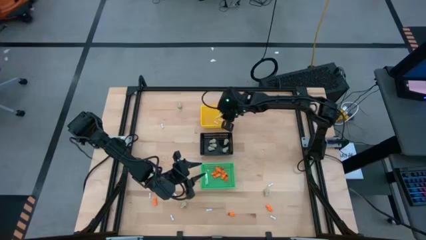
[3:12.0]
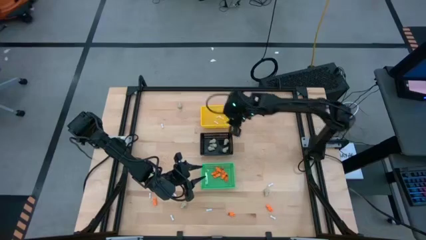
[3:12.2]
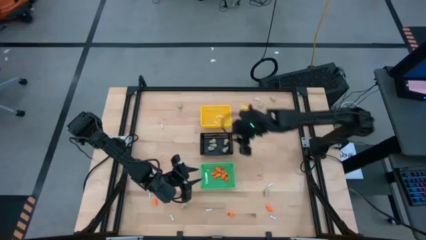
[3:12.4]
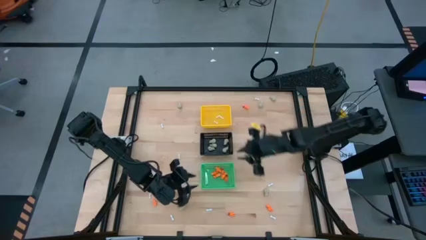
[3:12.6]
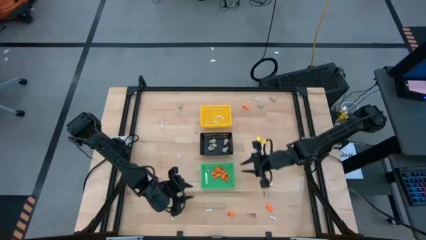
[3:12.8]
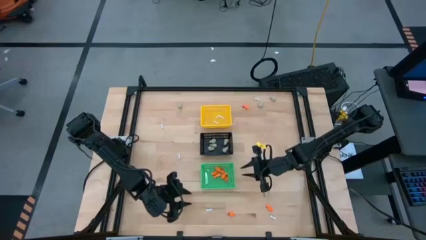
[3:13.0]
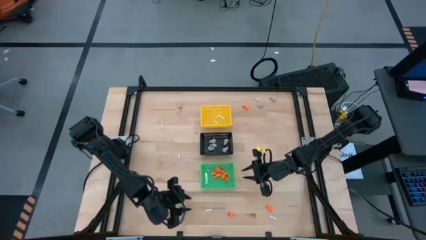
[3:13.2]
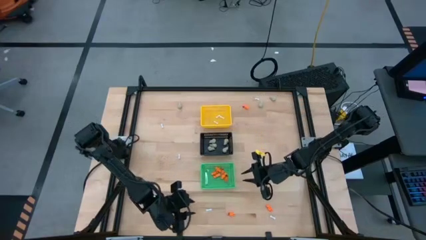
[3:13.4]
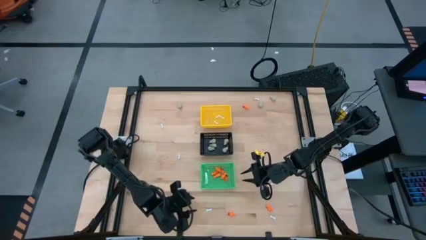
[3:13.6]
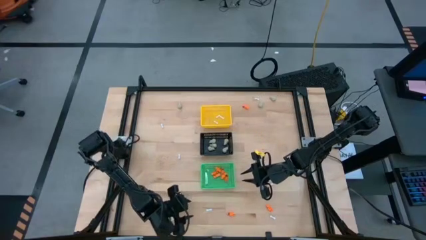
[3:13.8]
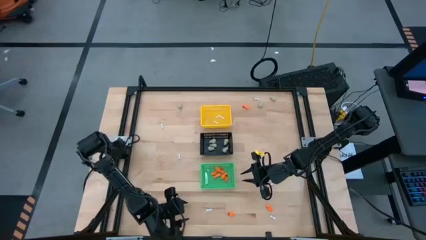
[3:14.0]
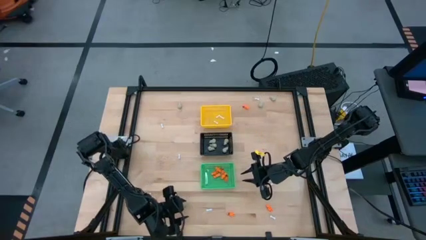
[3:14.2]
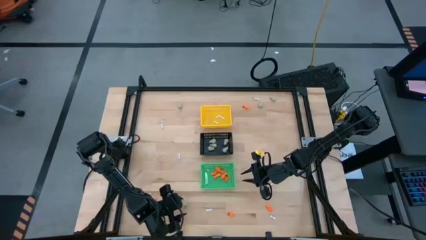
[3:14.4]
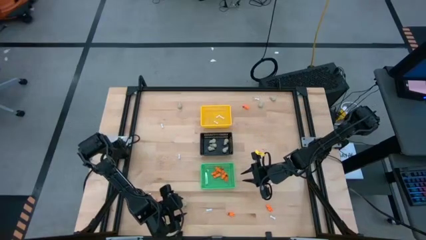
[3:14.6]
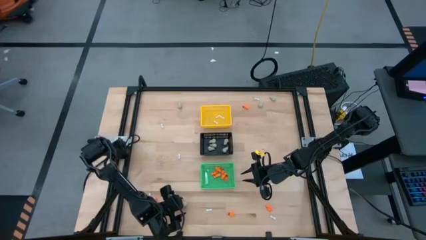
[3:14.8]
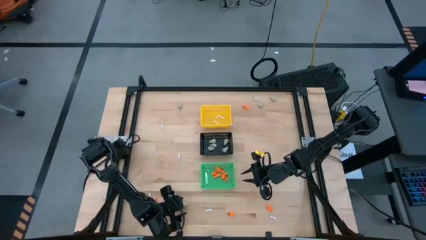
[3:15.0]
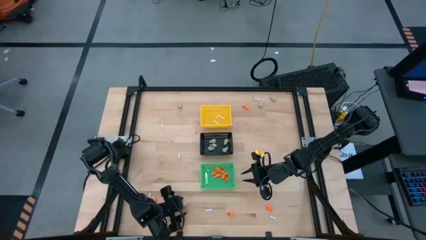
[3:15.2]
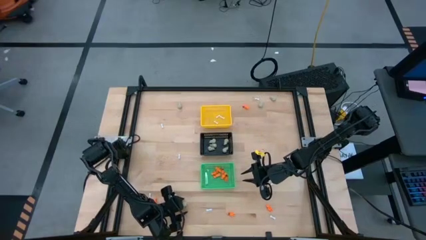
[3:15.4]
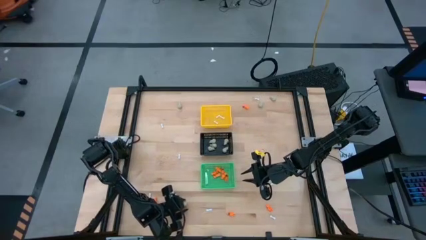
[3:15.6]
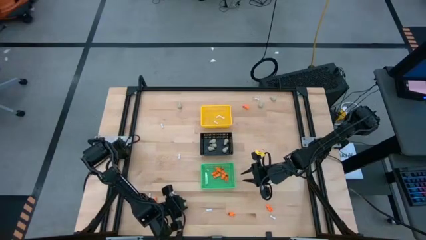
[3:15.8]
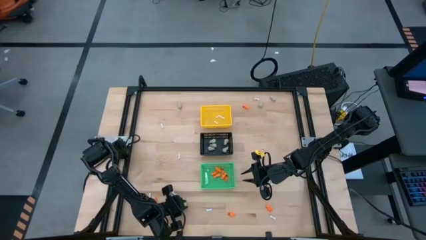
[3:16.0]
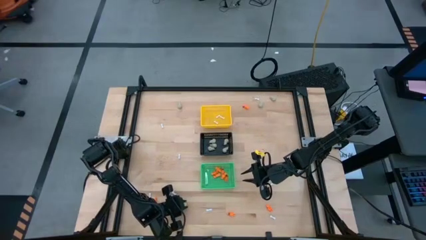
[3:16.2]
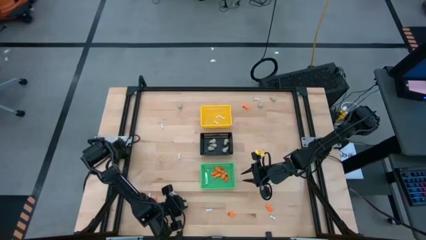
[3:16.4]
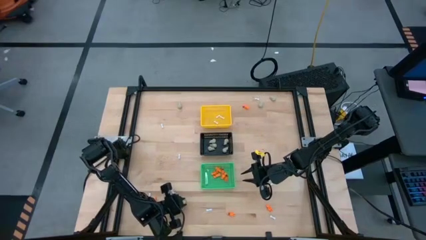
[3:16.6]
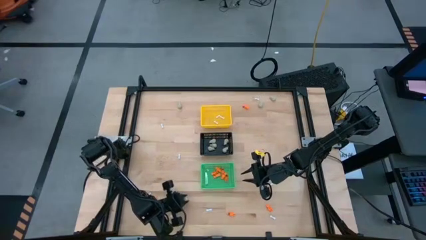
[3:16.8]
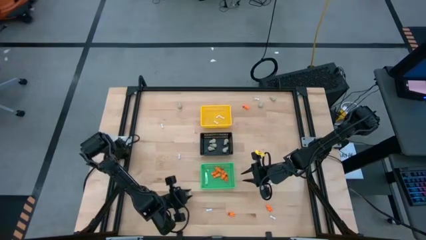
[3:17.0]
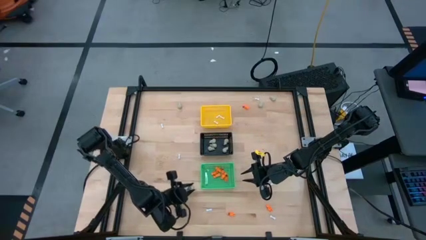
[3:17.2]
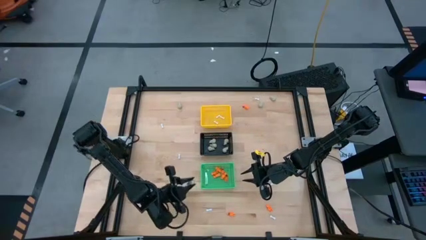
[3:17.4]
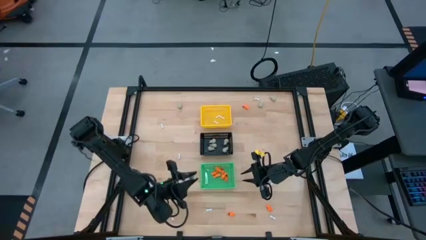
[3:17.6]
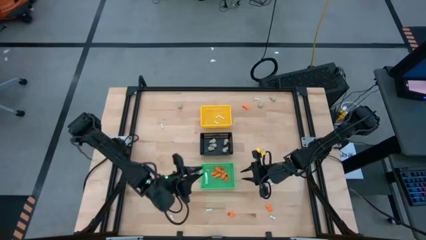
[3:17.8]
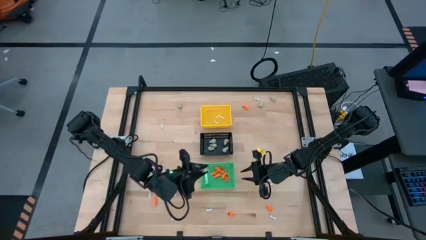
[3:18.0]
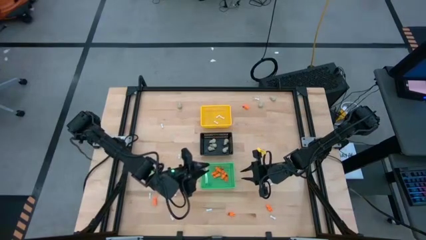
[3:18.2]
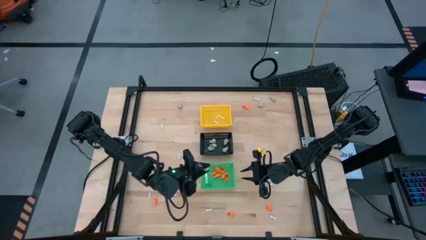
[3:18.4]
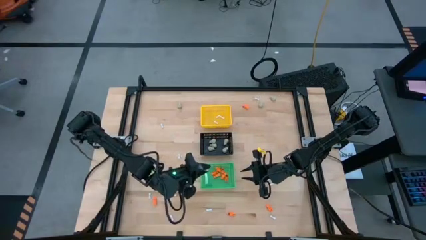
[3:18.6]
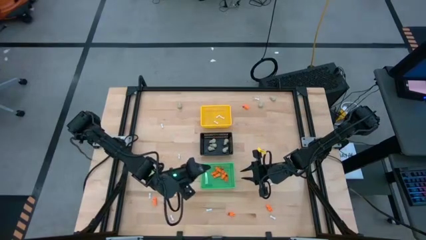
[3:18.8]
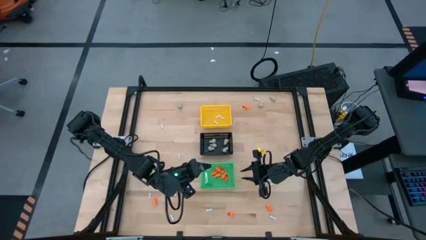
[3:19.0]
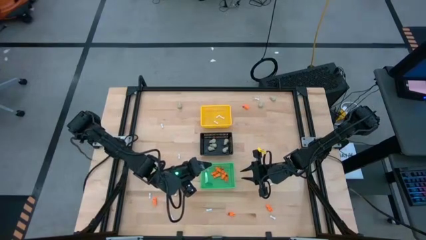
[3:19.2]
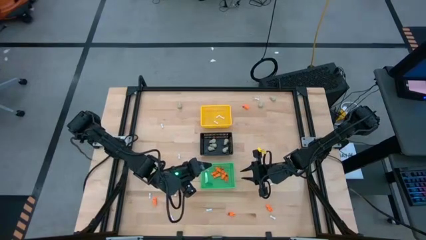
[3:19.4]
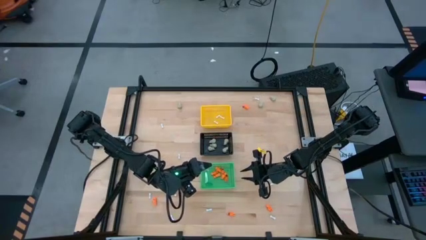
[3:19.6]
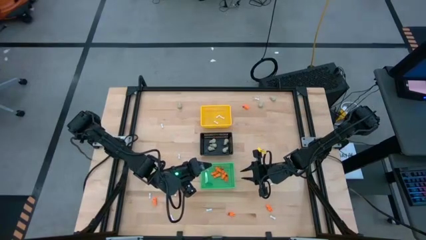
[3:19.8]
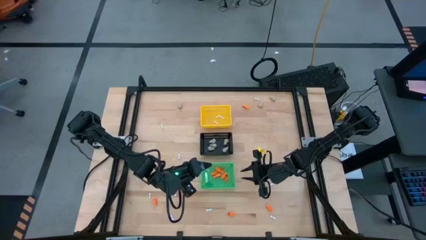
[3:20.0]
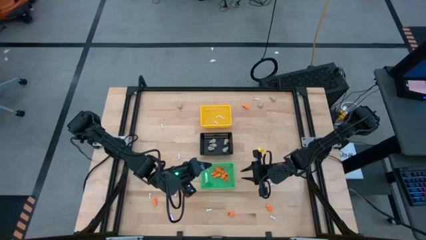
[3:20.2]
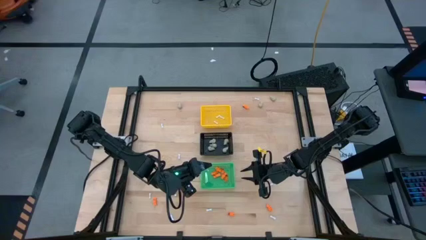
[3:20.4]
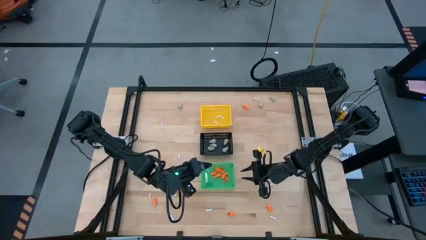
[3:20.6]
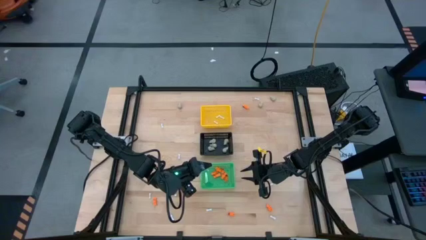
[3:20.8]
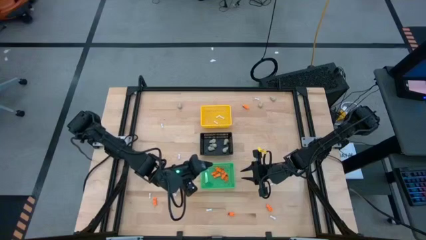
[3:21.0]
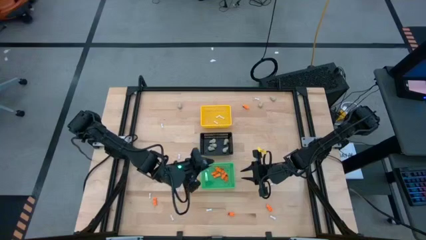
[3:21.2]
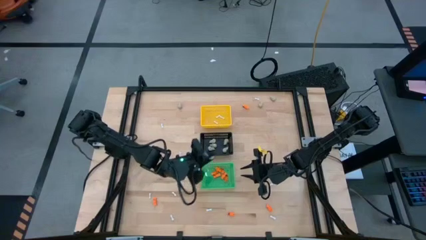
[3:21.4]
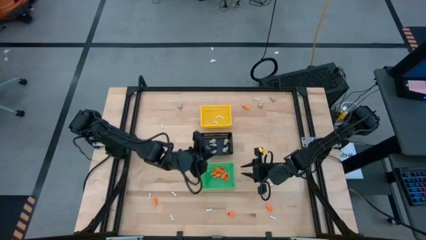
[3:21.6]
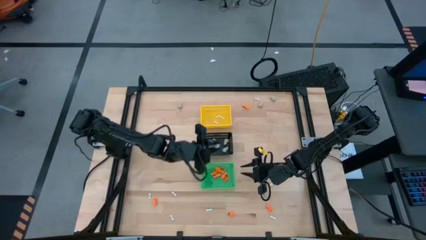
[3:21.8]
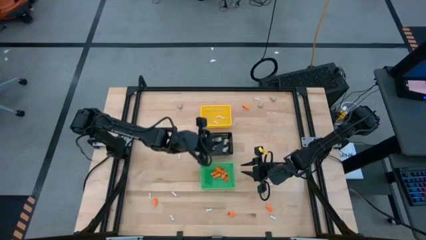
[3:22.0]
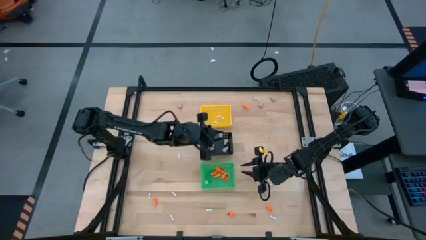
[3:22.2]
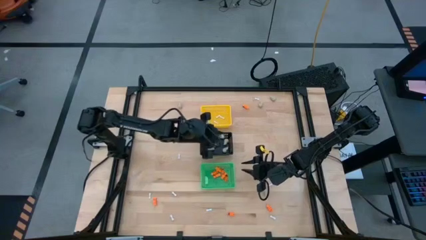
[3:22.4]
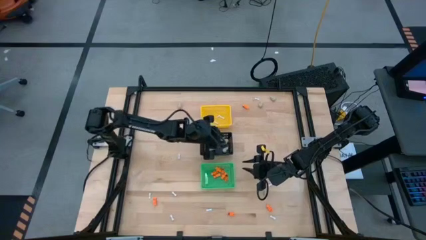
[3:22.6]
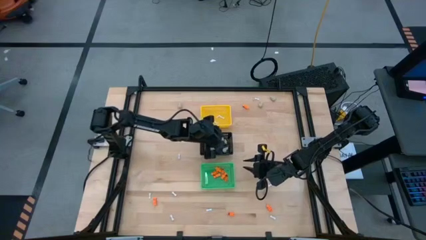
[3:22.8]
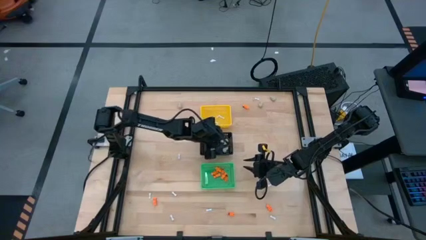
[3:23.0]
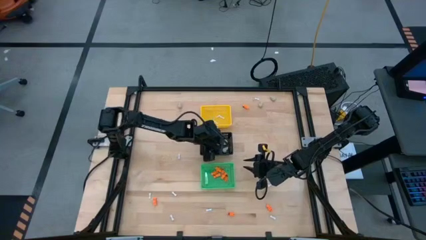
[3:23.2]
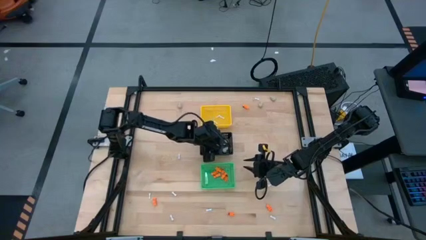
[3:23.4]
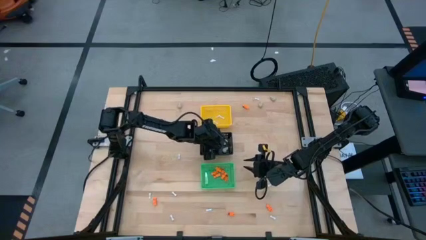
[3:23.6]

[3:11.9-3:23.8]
Task: Sort Halloween decoration
Put the gray skull toy into the black basket
